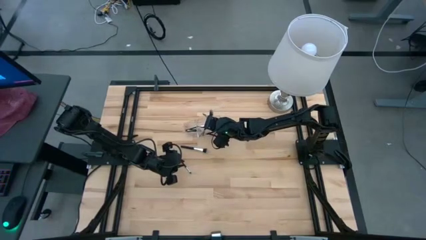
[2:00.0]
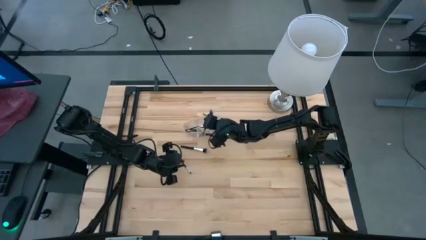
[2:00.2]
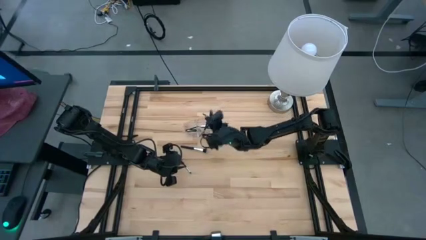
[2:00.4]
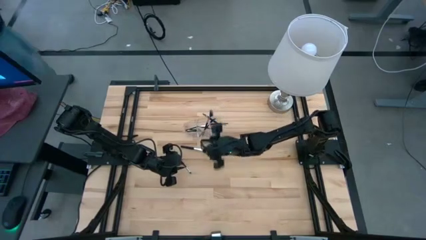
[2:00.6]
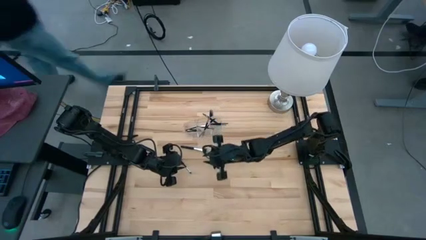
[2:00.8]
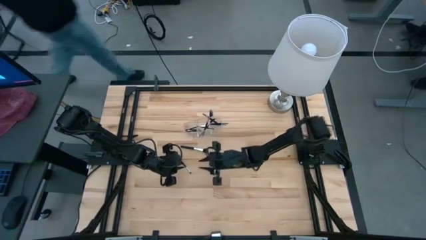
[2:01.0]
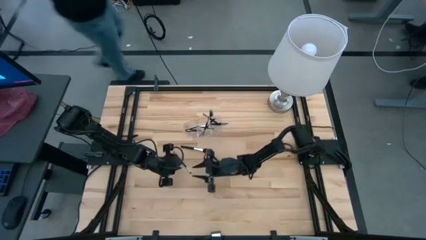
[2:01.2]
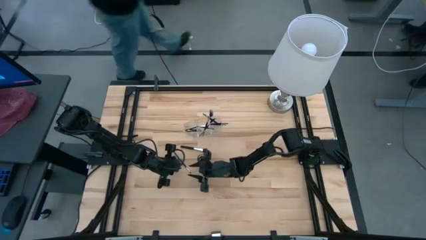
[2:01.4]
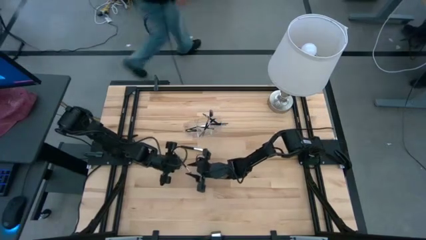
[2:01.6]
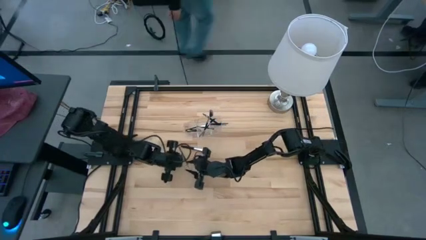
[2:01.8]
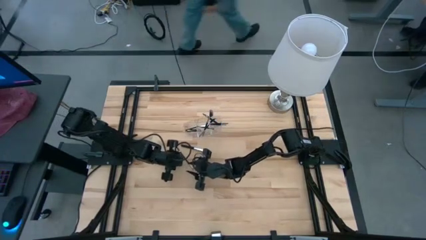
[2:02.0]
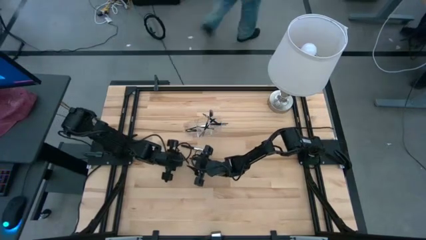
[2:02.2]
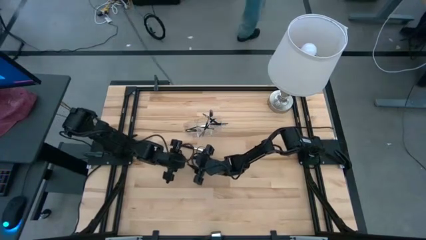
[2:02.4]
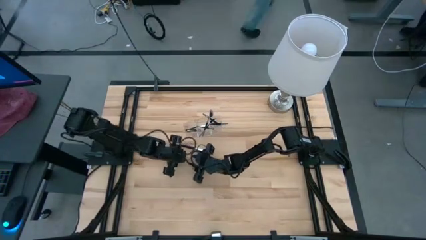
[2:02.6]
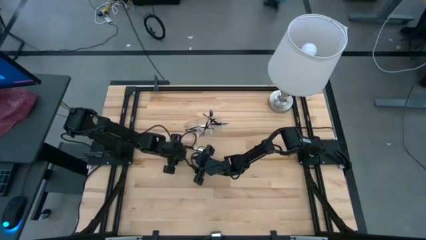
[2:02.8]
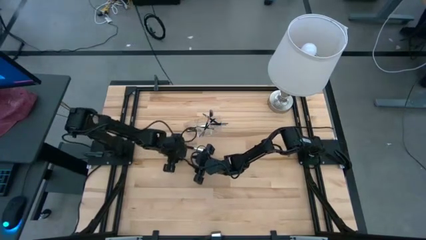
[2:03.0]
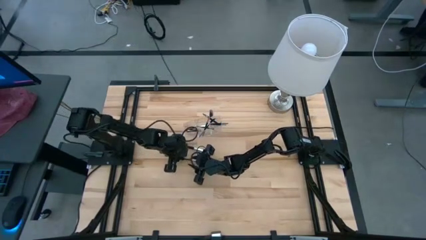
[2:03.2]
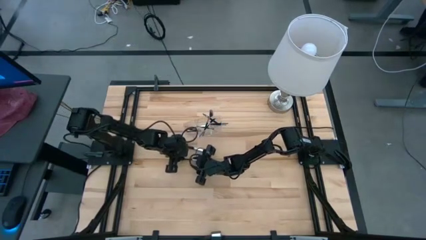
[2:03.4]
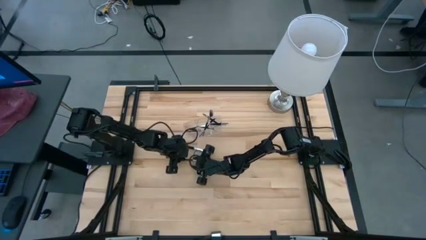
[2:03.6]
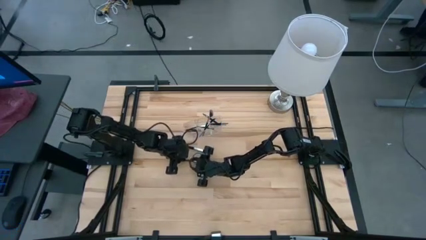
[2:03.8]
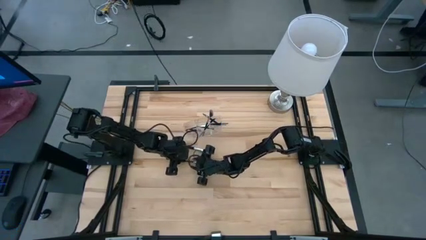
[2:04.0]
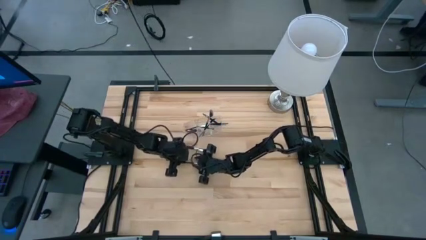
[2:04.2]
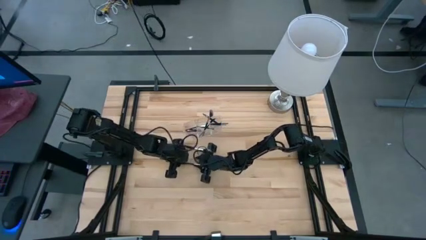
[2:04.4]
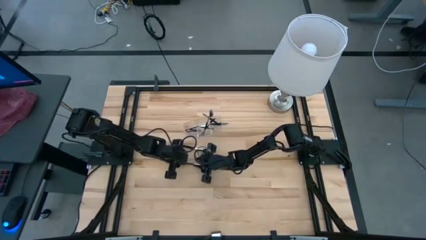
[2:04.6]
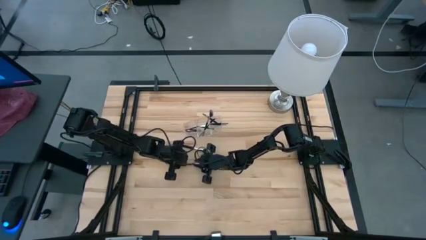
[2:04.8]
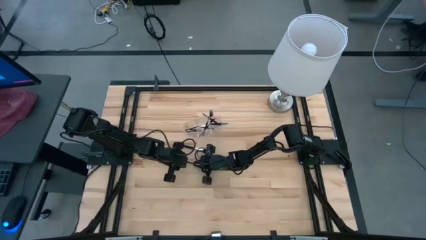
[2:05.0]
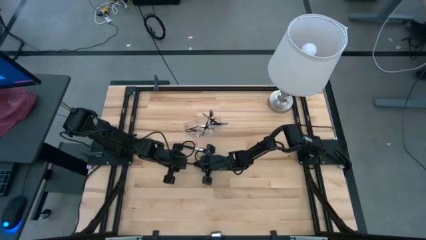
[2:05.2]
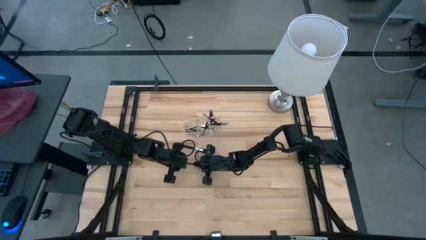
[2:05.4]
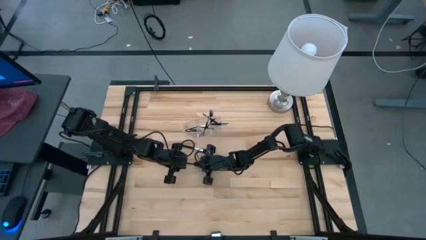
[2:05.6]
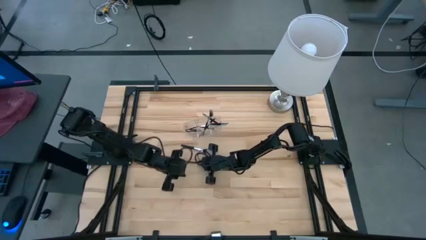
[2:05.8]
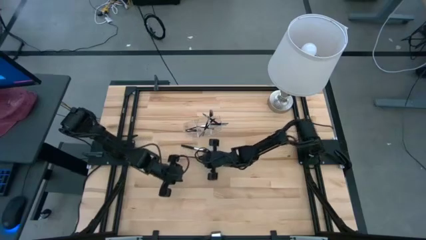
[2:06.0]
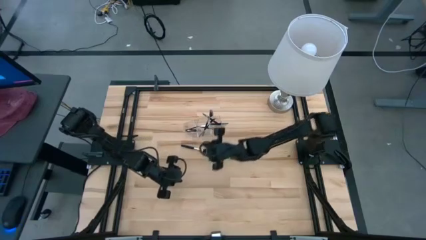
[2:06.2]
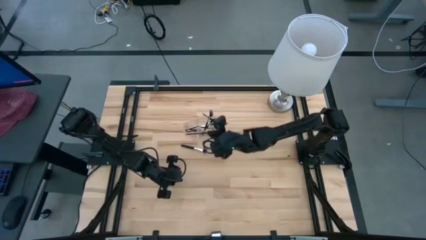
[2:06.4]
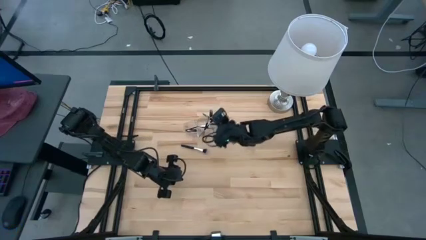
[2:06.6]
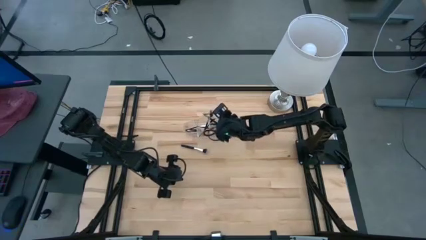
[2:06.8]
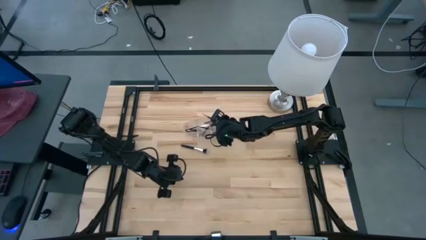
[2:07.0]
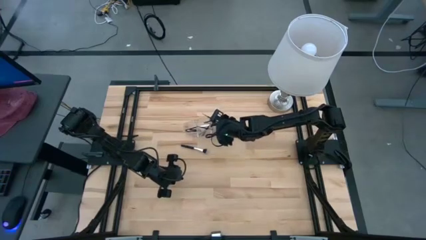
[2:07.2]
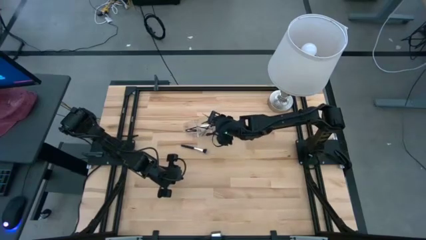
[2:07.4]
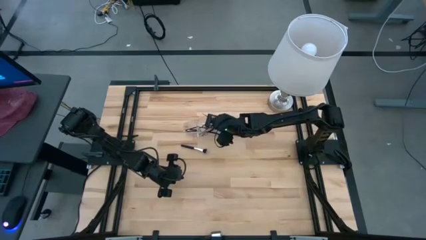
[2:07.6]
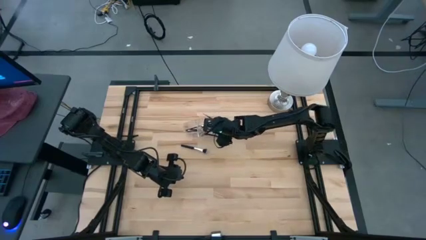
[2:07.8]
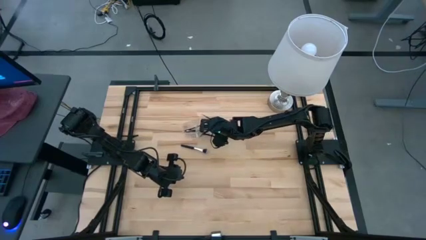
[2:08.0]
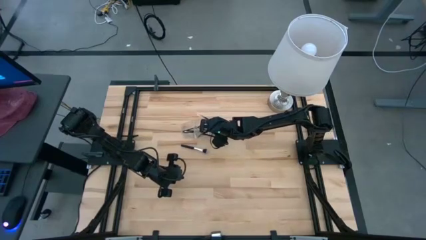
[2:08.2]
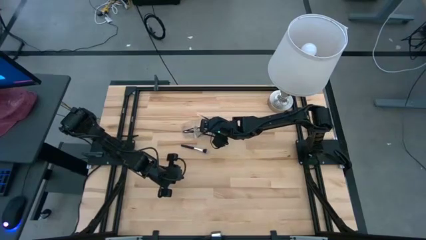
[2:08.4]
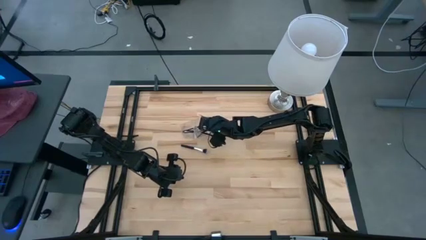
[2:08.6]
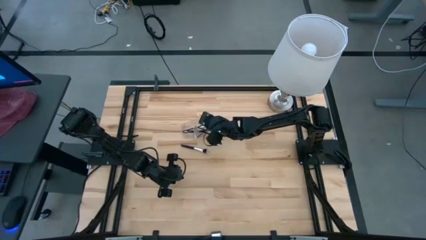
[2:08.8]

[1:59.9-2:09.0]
Task: Put items in baskets/containers
Put the black eyeshadow brush into the transparent organizer

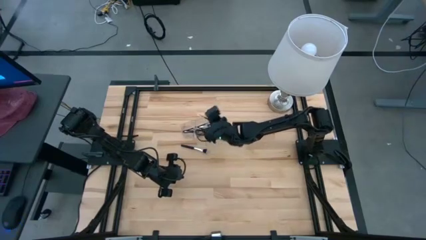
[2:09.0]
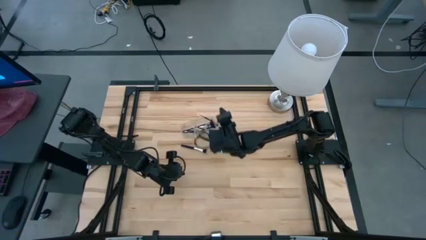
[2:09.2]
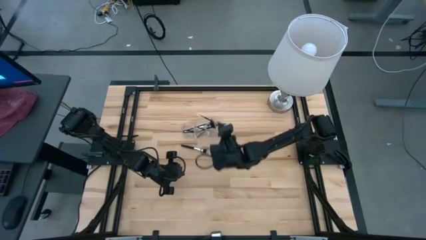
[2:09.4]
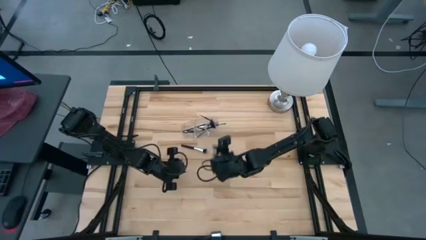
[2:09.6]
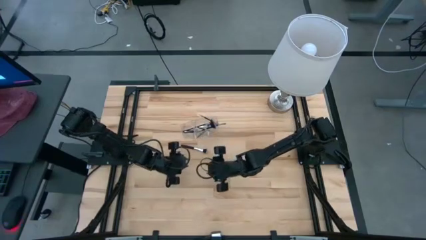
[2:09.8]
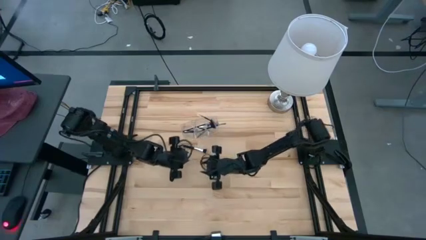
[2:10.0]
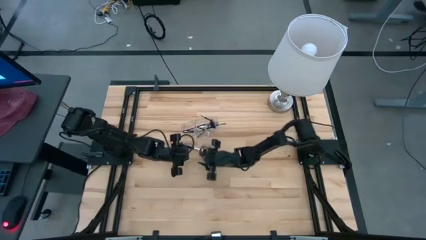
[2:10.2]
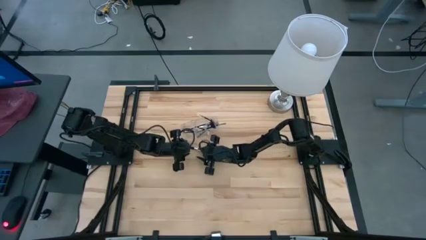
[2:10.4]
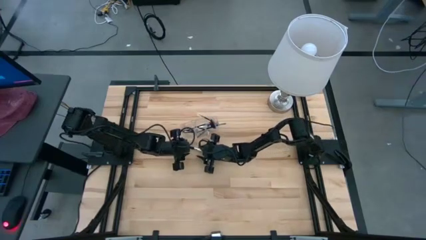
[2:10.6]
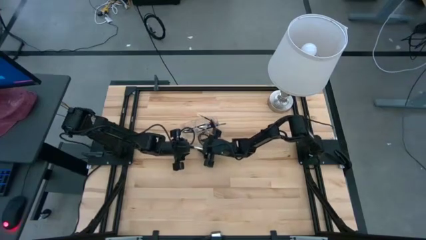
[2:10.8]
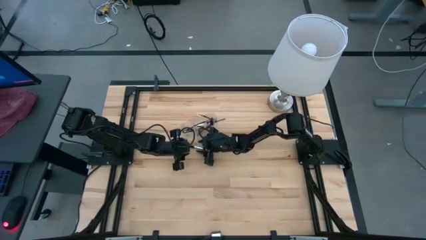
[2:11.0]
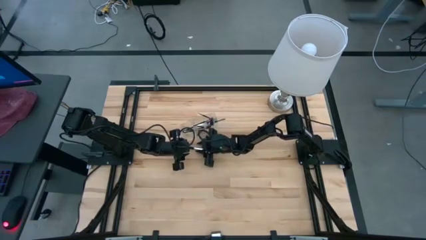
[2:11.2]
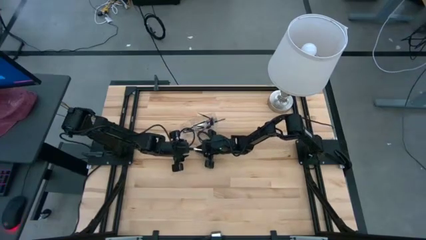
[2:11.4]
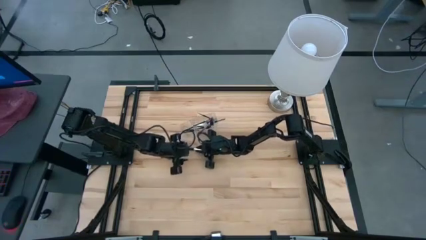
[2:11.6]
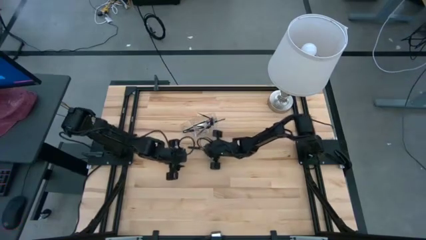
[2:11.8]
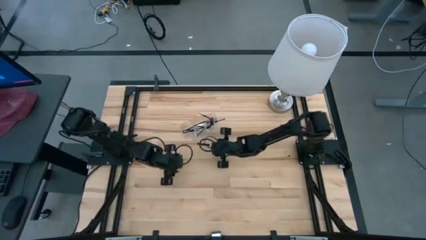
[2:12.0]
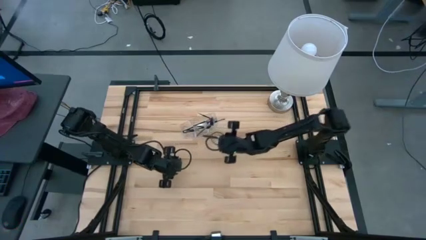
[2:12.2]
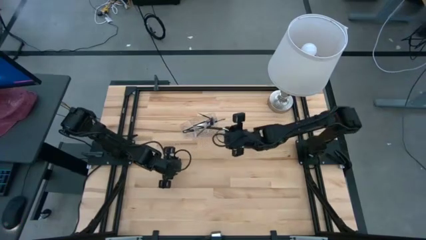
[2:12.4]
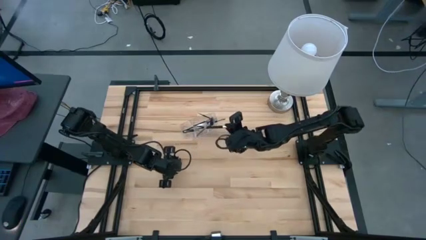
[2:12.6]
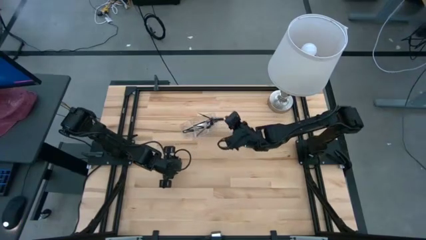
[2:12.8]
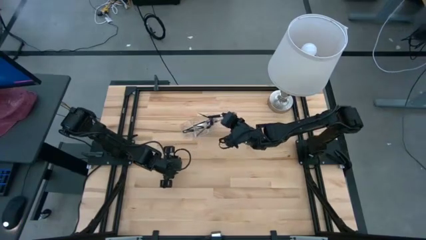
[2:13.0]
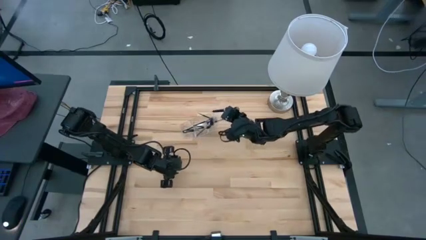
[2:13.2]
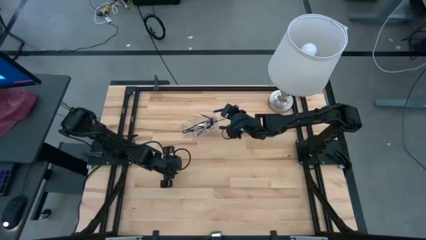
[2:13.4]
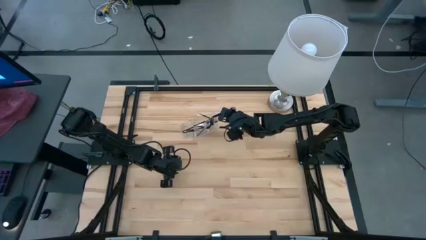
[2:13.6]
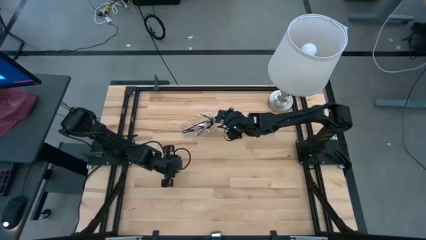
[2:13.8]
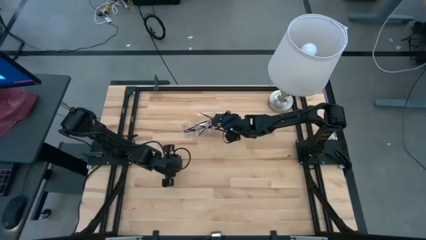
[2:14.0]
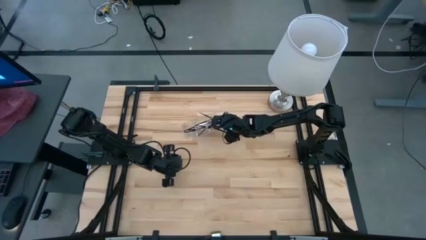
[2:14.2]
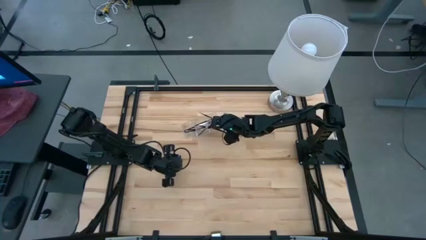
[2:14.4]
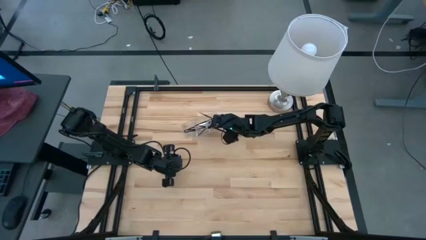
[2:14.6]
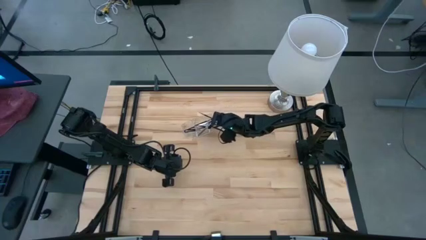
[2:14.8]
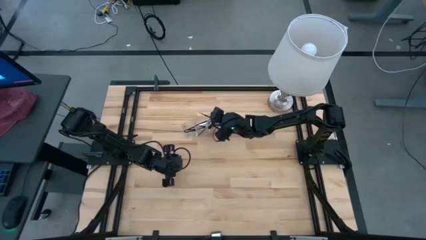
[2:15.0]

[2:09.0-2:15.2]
Put the black powder brush into the transparent organizer
